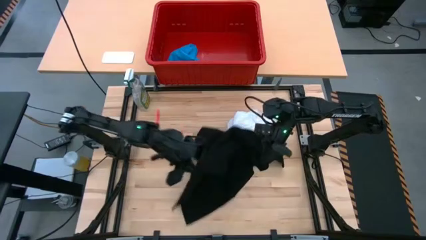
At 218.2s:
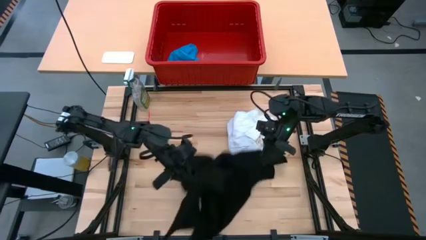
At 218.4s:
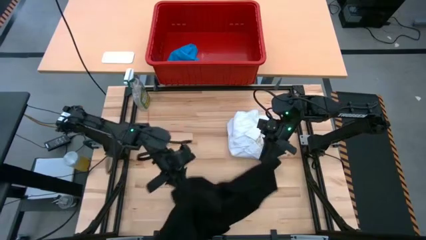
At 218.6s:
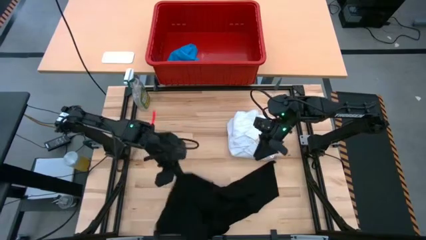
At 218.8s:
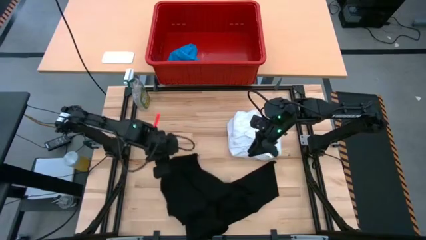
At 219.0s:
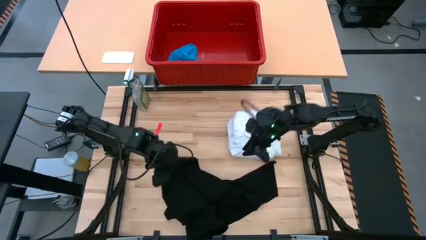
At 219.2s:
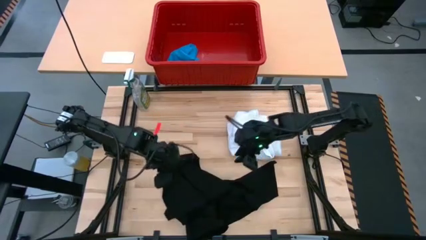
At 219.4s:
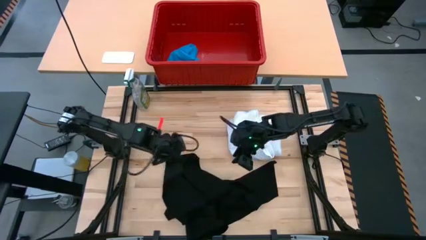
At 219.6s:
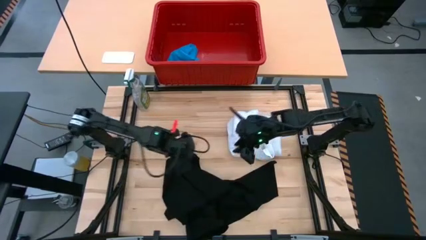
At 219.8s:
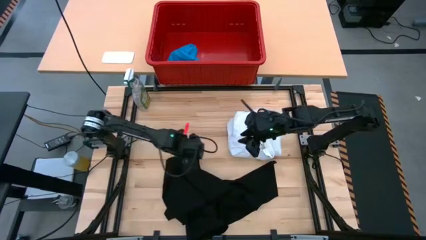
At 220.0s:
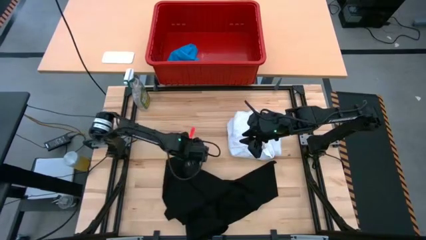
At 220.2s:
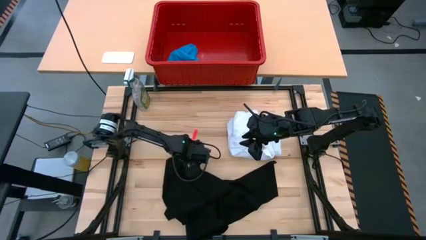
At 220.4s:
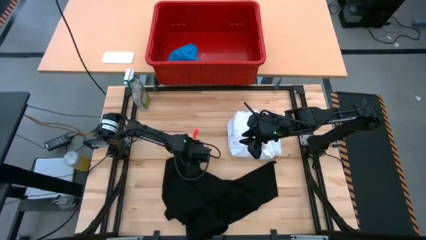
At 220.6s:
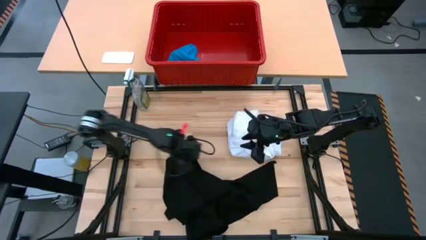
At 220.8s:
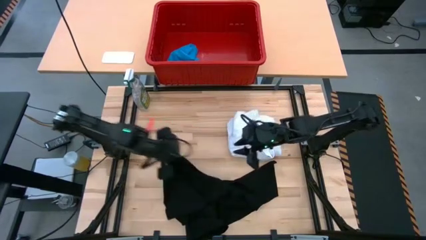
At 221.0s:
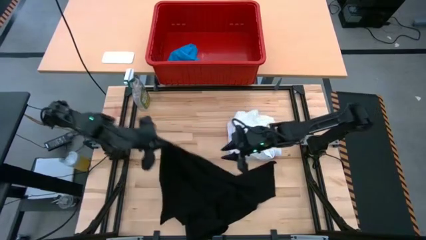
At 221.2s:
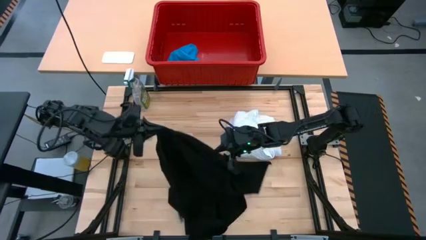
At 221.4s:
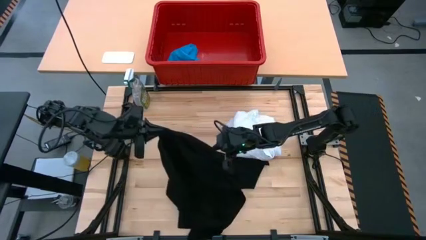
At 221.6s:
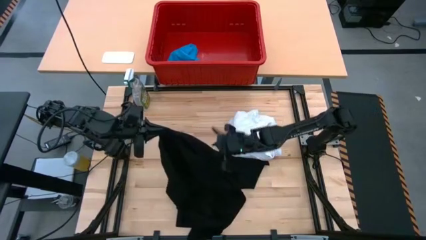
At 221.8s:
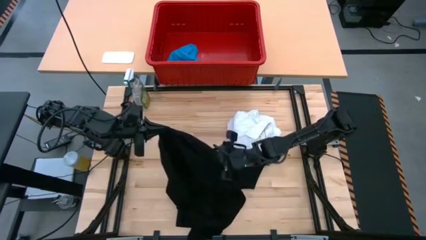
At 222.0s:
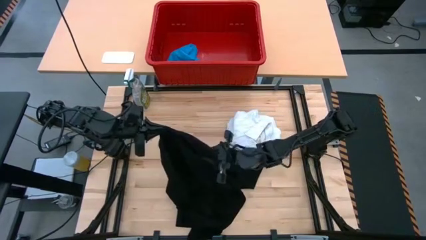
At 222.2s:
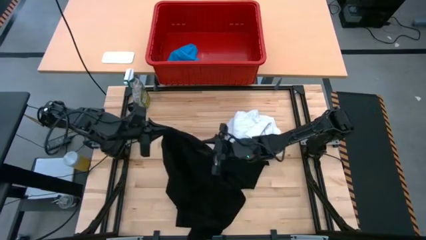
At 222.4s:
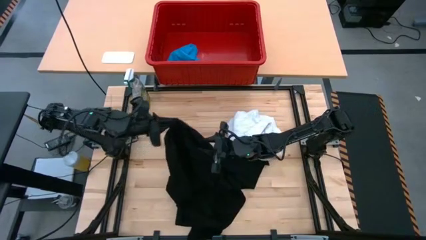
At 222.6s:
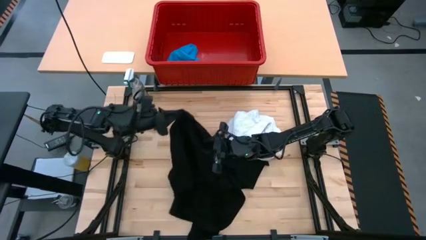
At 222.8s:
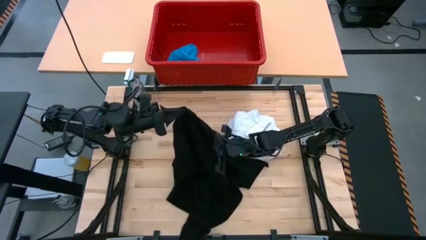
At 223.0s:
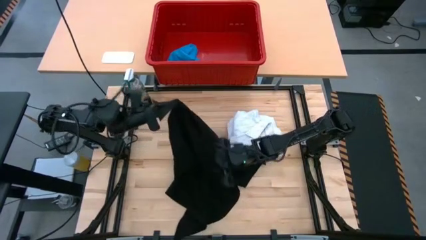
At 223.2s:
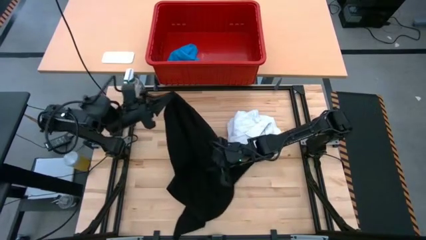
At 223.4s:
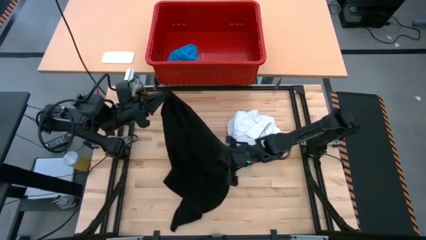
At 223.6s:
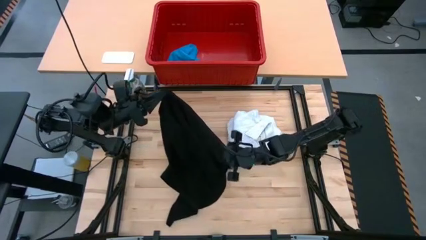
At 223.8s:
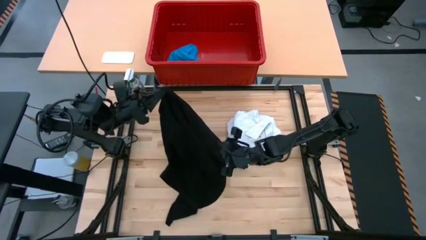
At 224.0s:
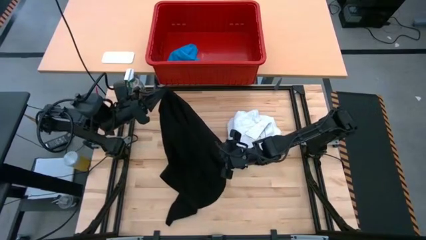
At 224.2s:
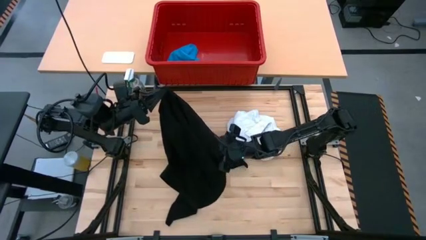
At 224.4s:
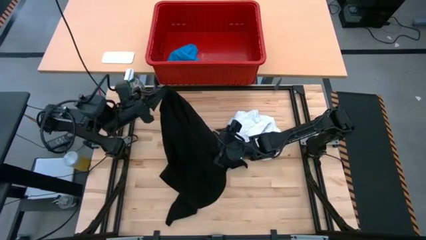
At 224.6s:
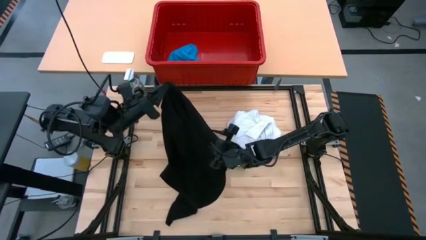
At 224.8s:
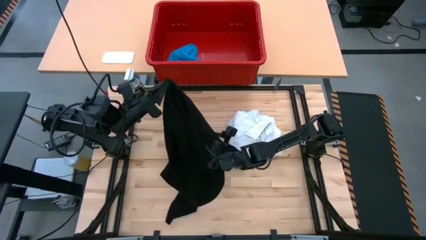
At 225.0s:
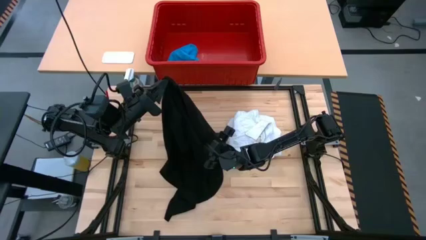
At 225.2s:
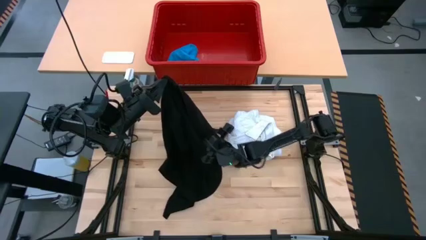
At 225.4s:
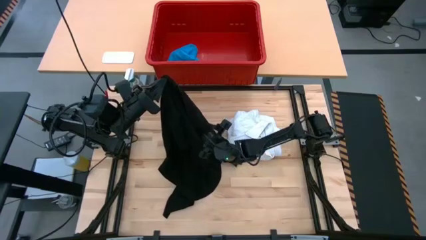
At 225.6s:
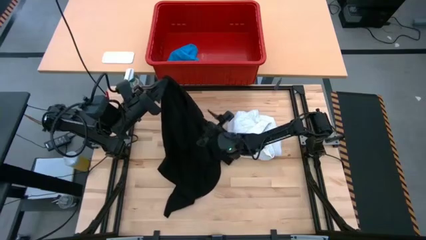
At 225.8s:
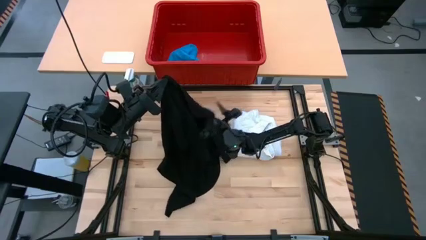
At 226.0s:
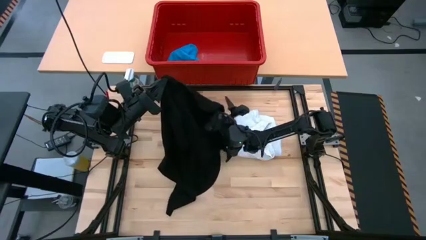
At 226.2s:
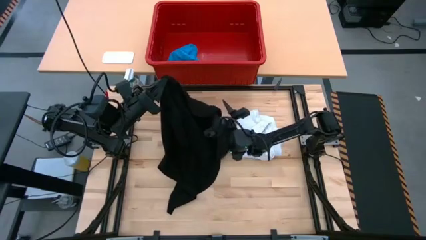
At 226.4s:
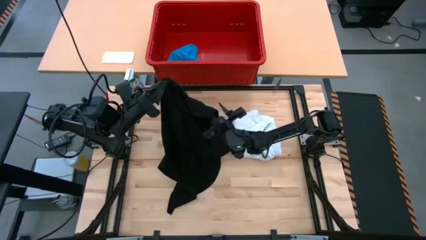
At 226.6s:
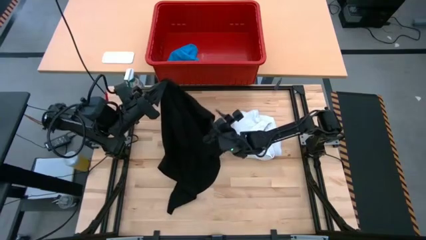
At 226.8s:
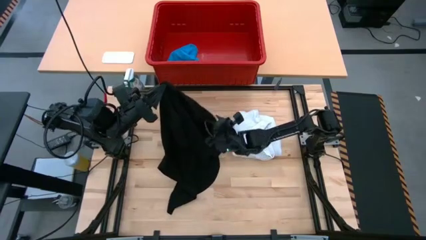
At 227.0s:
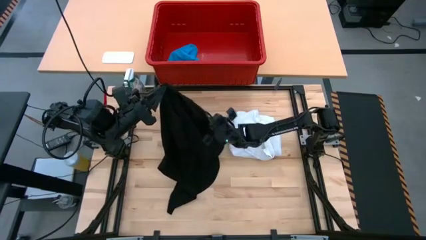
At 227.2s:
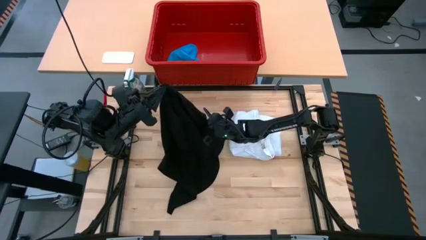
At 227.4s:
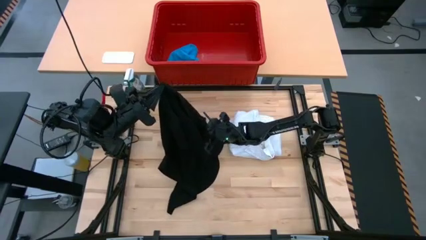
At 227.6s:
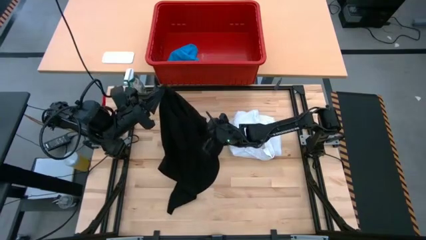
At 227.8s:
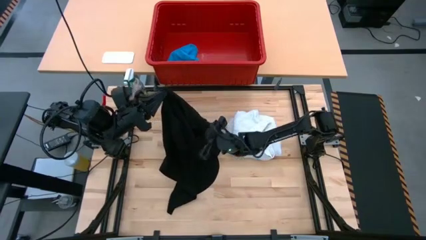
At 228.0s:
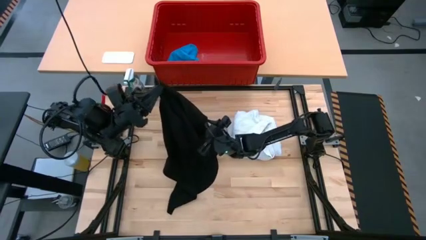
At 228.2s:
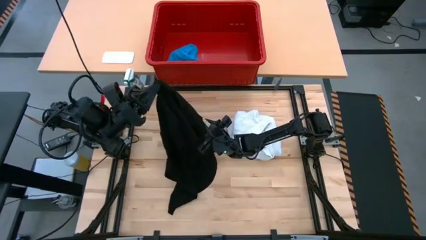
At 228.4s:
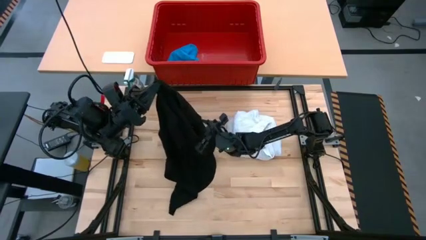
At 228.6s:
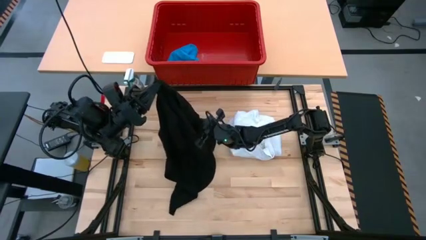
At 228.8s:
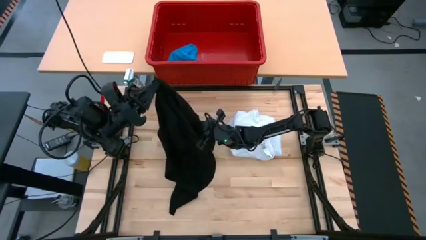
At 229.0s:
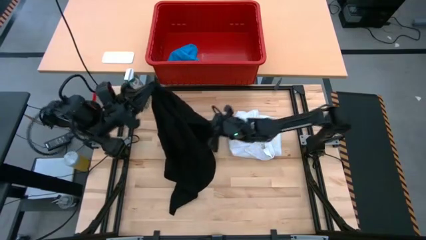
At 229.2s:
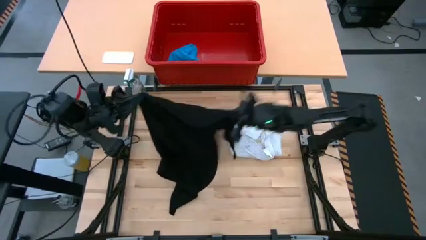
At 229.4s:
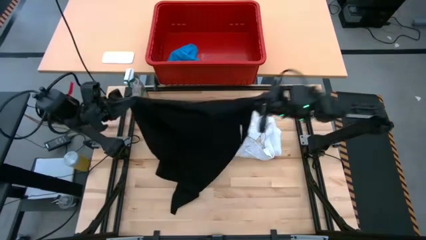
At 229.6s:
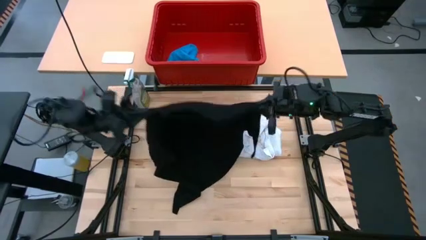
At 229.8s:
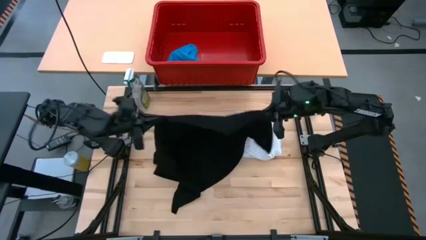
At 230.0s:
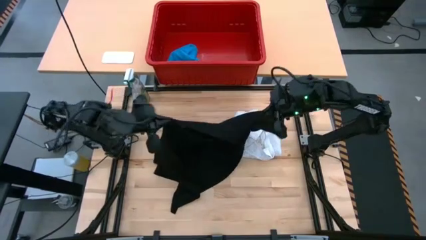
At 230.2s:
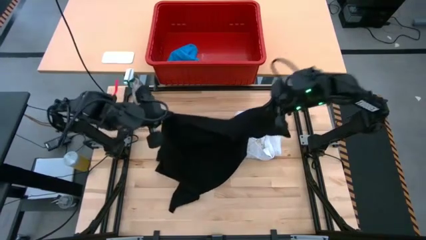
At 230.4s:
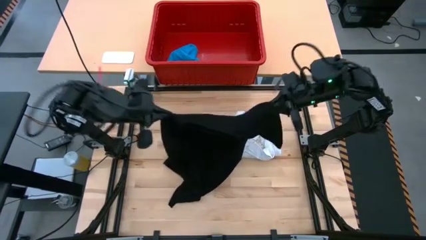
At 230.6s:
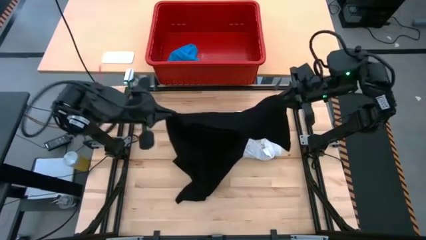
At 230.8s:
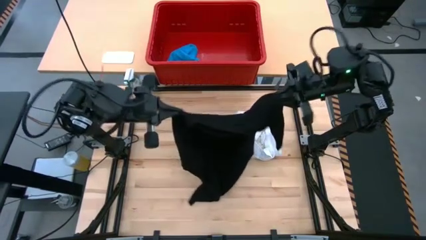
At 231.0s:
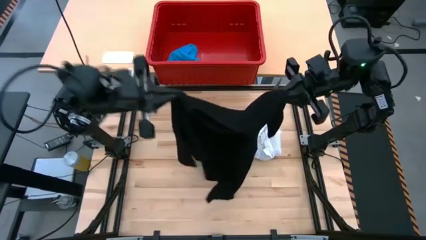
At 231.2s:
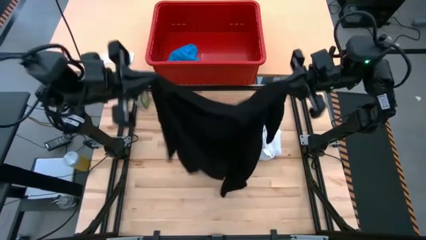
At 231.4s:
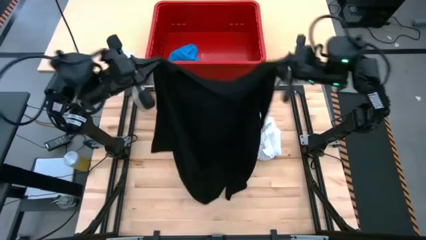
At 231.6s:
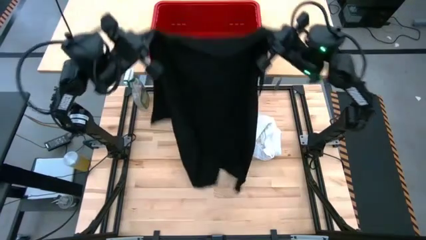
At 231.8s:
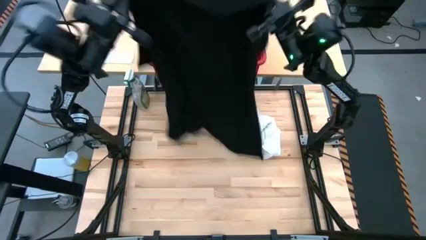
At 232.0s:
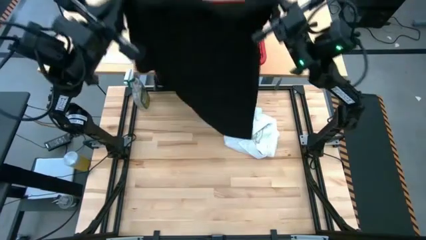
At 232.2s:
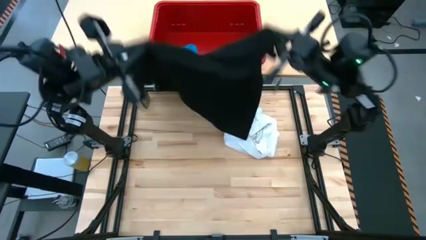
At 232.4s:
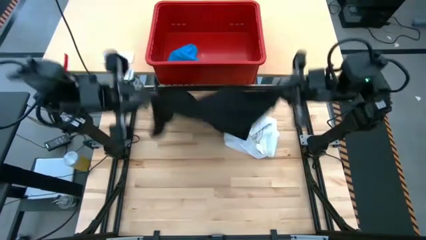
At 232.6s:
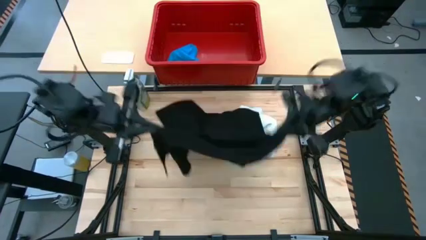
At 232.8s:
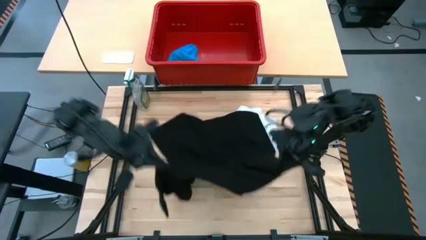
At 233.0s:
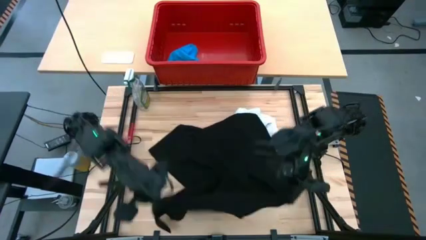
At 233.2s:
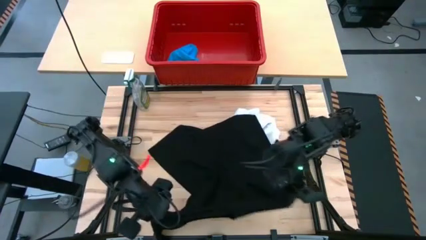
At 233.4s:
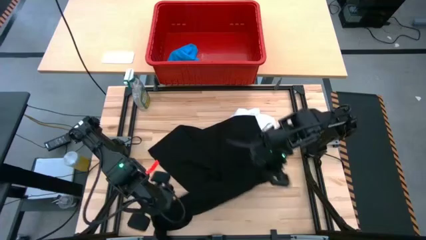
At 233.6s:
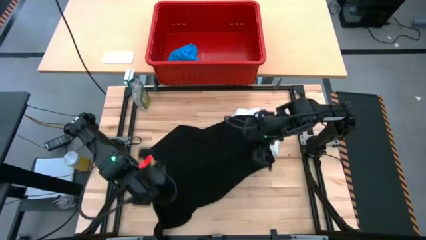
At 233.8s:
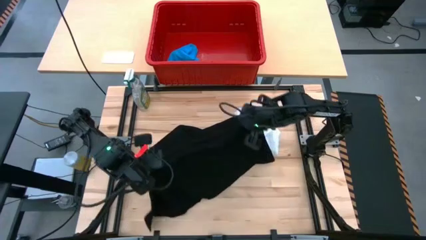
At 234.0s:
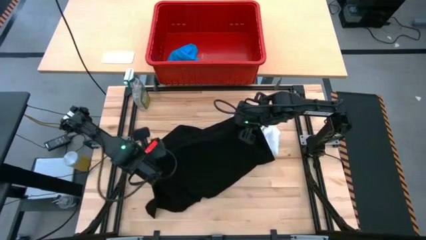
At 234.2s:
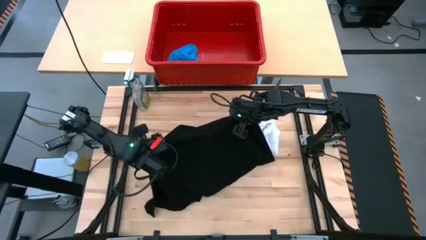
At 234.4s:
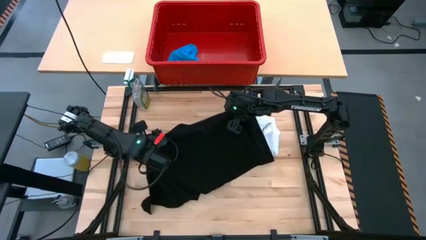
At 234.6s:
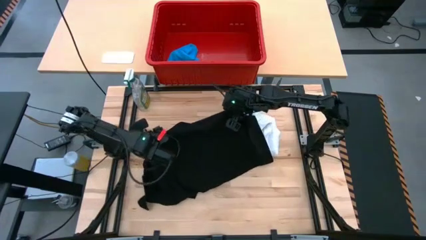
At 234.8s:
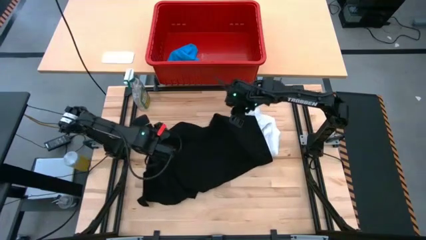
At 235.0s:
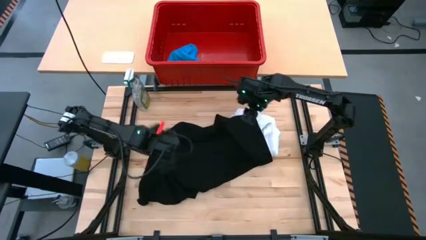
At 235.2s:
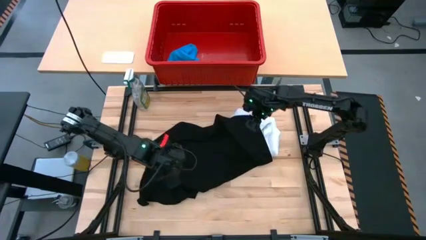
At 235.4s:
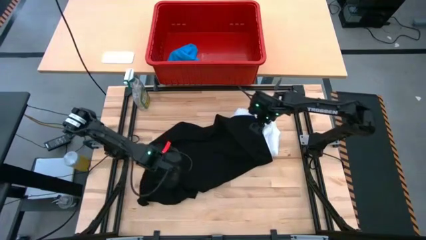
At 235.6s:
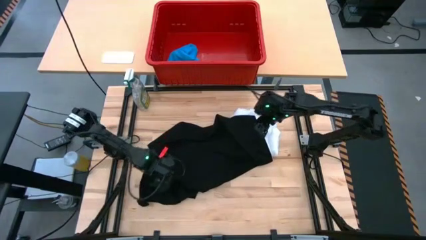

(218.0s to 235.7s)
Task: Fold laundry
Fold the black shirt
